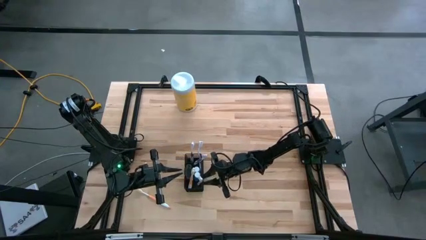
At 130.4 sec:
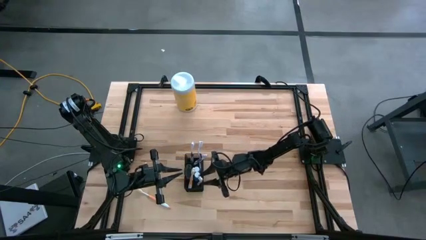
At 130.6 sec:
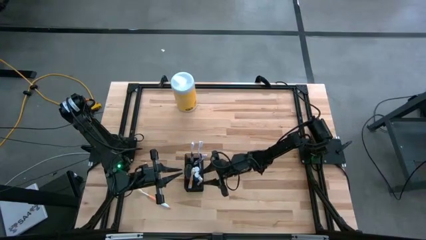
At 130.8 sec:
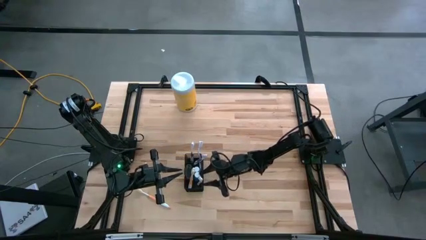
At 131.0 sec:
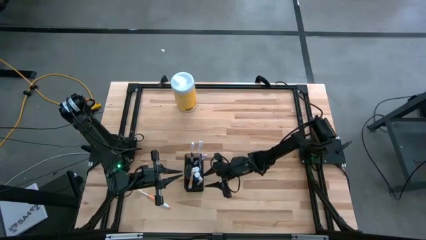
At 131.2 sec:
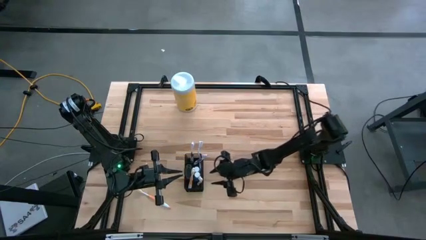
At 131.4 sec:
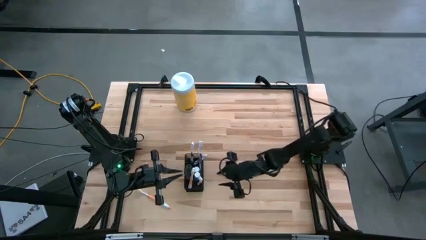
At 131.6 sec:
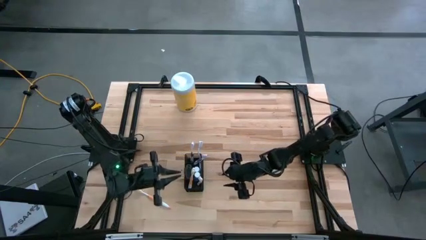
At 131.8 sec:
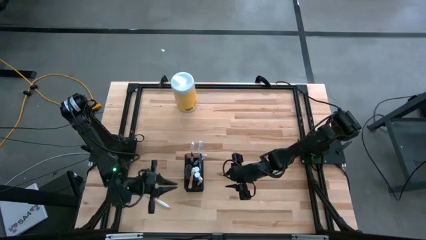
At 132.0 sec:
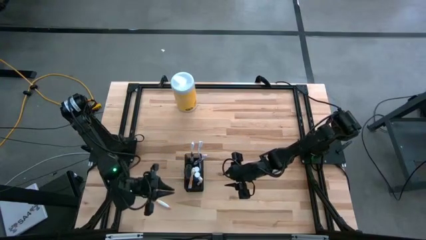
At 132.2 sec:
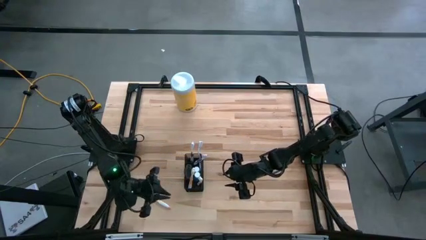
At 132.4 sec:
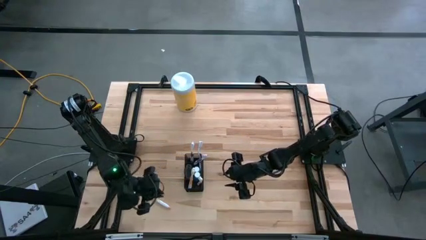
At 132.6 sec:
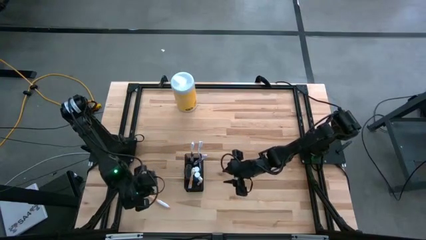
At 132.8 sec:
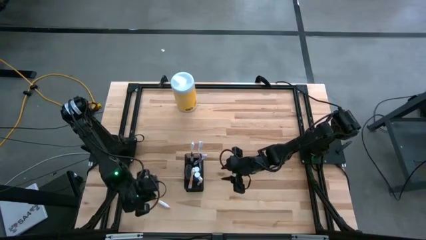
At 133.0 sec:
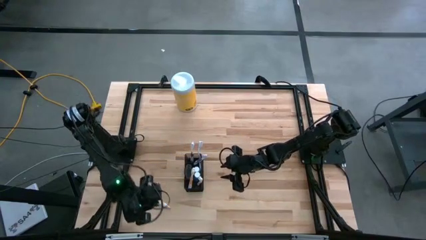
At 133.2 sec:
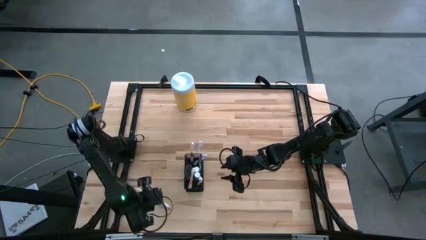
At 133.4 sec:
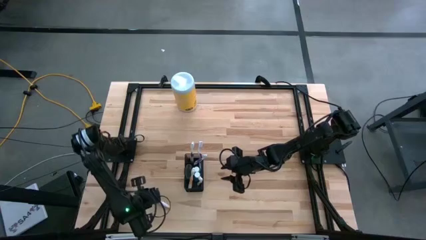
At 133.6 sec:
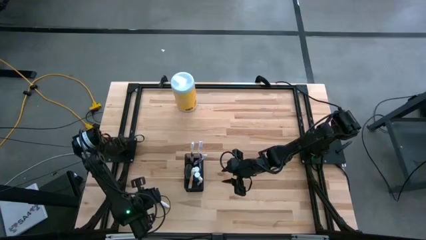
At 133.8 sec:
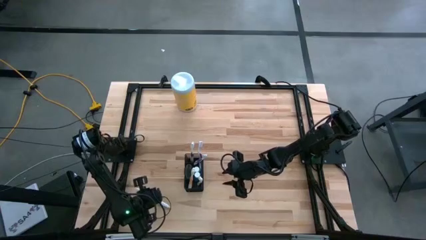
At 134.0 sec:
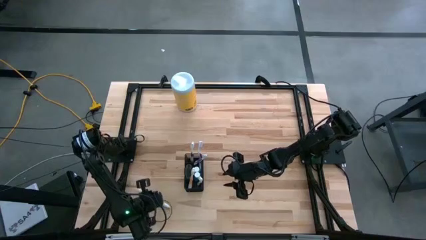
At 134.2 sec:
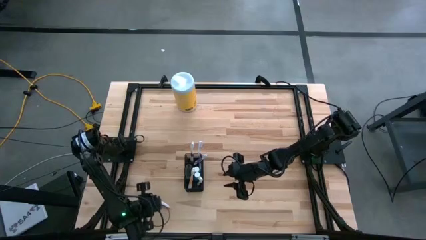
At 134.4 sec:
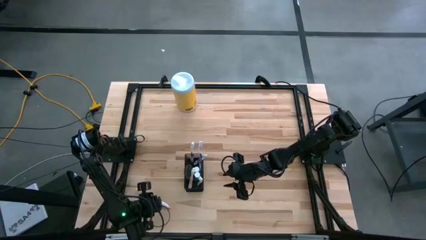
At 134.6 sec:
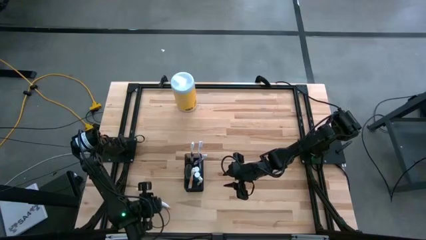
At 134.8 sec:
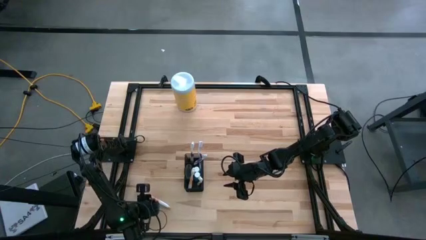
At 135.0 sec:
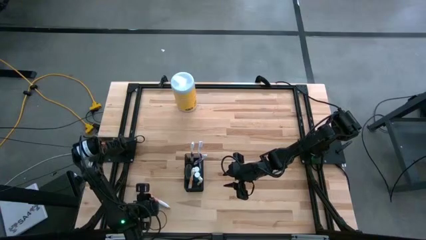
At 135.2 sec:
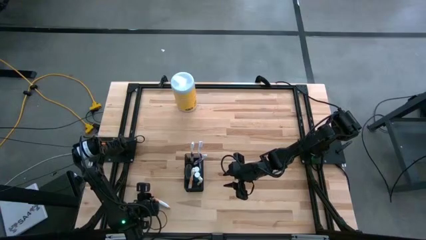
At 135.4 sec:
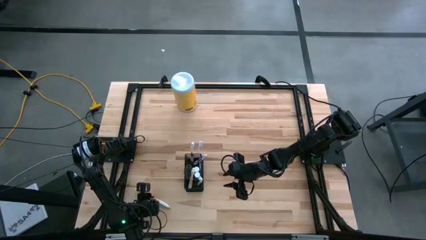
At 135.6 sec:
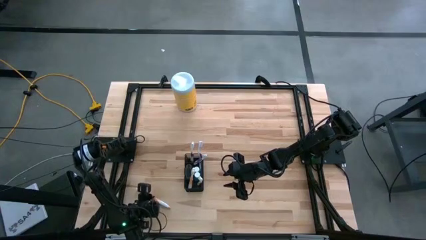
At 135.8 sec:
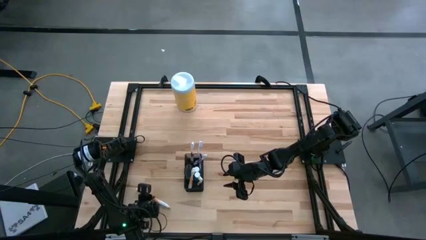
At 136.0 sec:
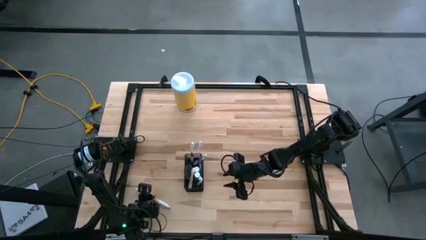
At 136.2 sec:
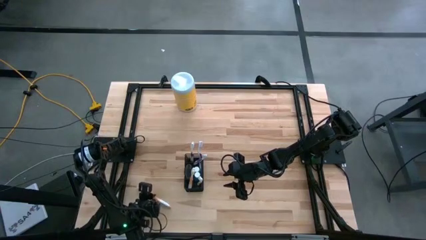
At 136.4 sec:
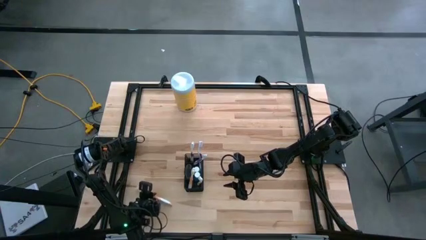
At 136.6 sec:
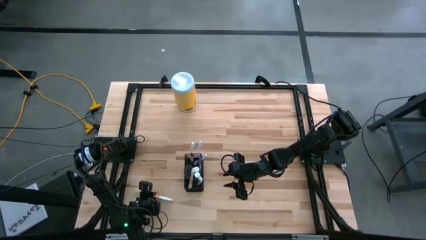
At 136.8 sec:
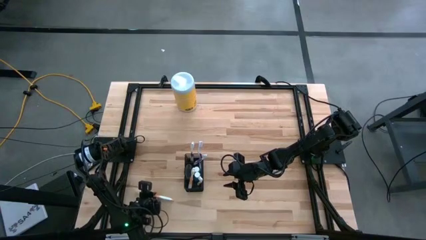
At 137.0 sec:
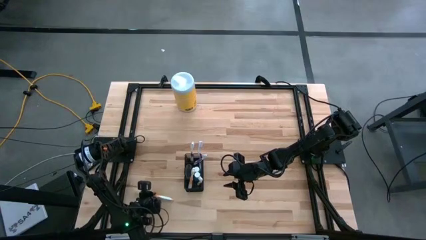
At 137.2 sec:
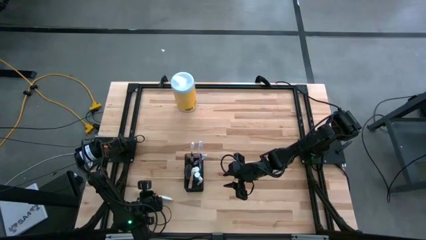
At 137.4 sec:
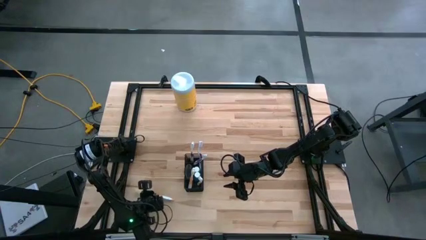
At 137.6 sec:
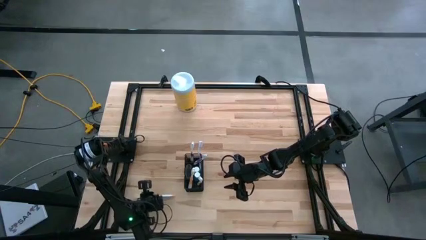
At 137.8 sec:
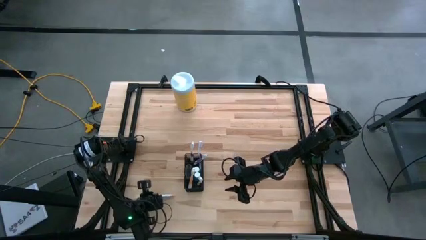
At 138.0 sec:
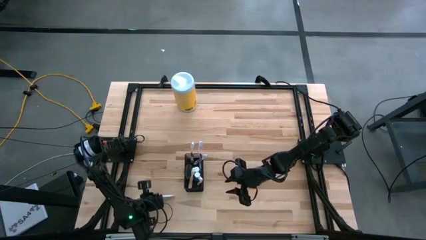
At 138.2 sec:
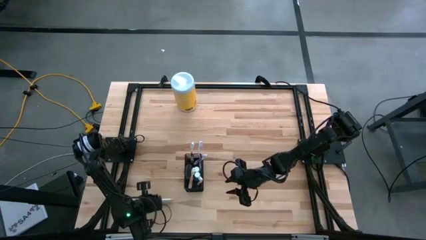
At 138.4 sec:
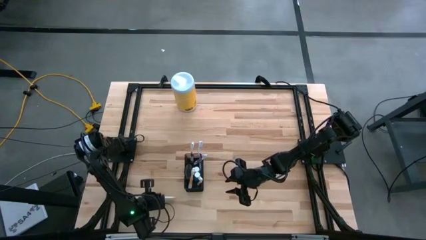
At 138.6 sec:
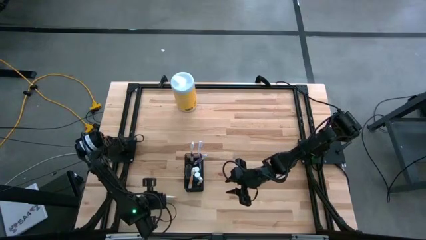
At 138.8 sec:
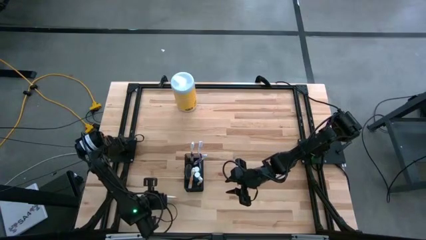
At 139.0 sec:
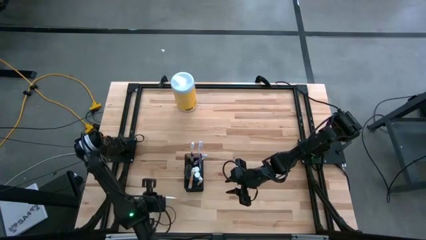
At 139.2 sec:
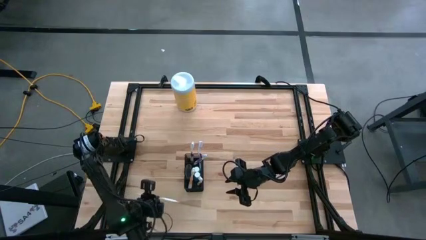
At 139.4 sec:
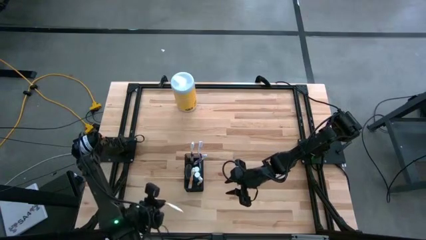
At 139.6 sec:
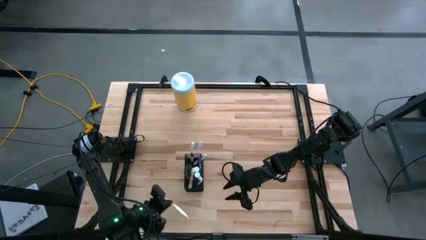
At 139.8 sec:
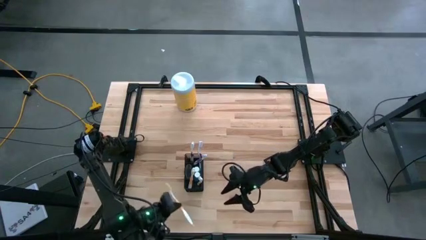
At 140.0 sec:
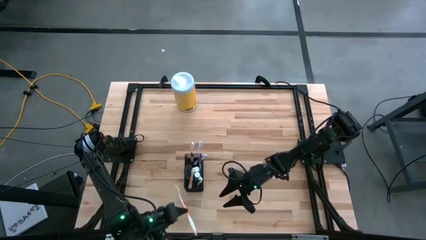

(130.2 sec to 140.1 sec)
Task: Pick & Place toothbrushing station
Put the orange toothbrush into the bottom section of the black wire organizer
